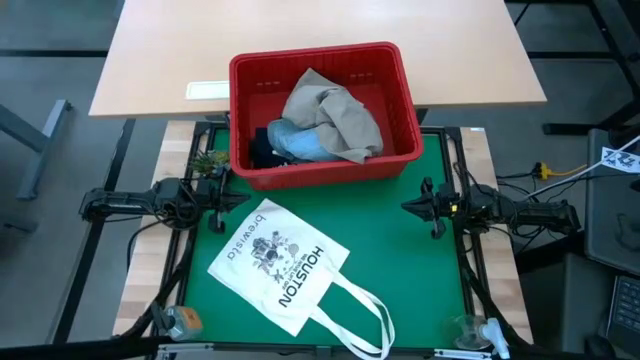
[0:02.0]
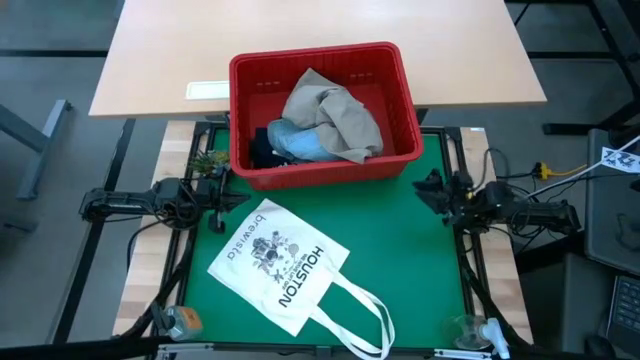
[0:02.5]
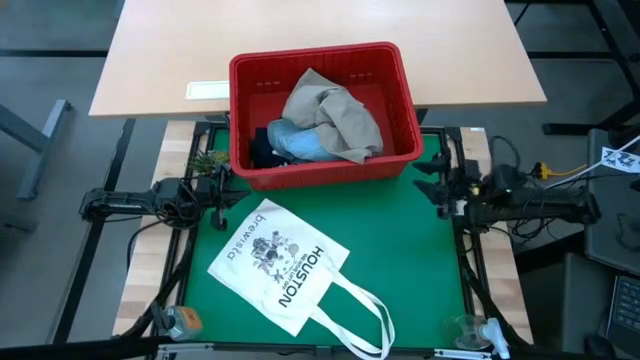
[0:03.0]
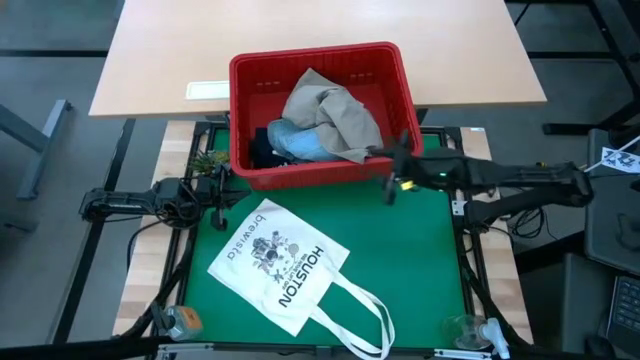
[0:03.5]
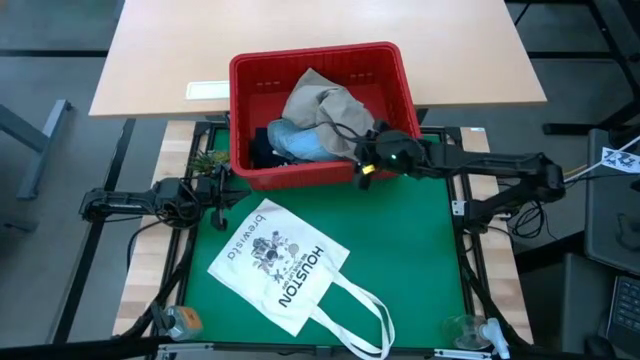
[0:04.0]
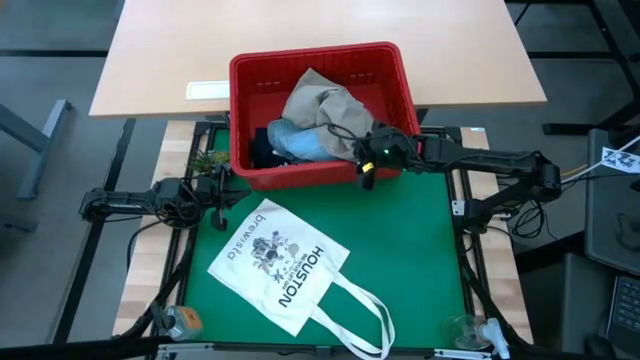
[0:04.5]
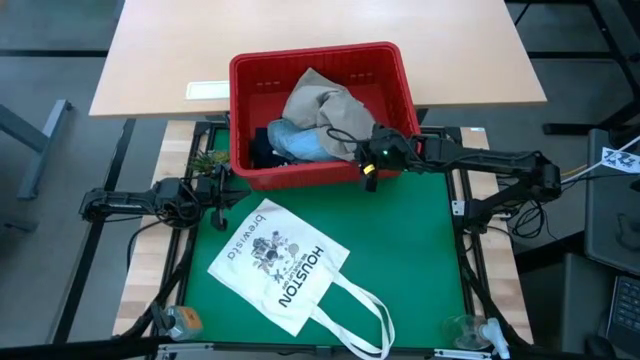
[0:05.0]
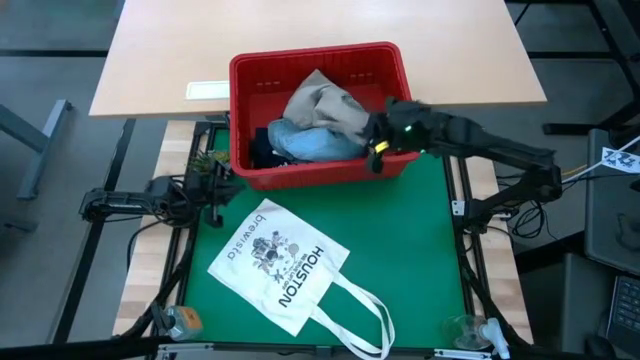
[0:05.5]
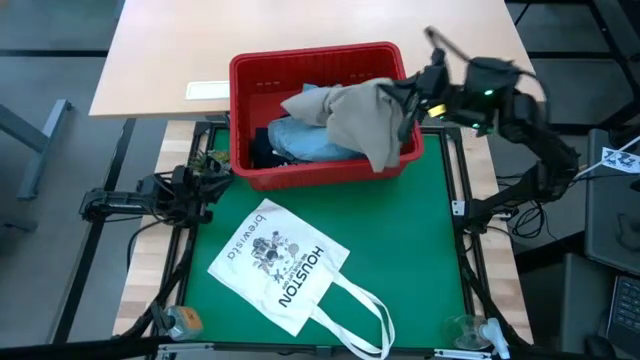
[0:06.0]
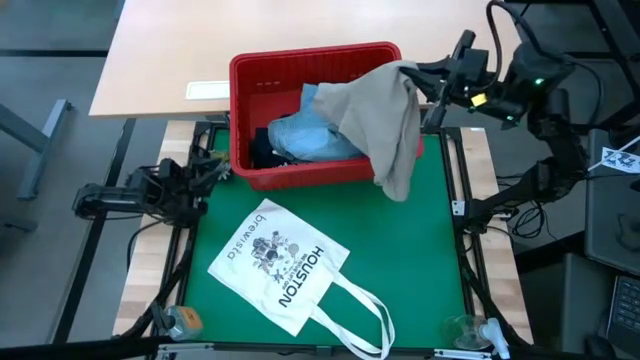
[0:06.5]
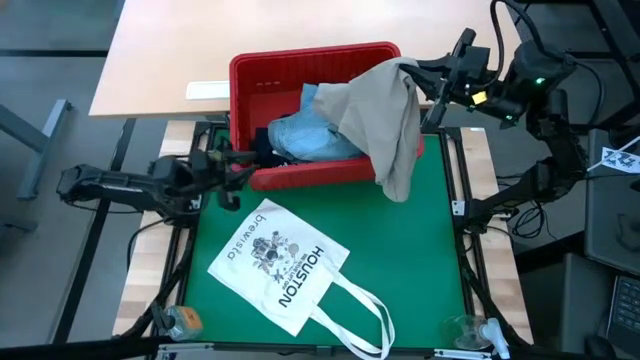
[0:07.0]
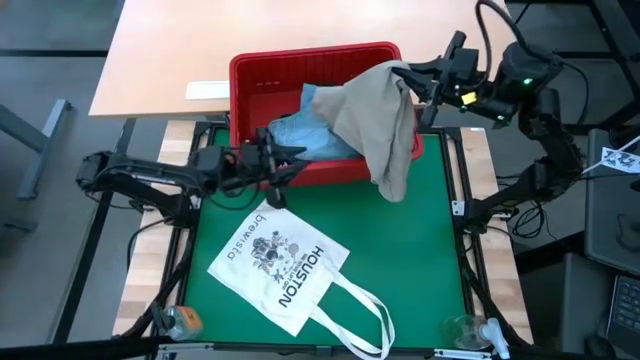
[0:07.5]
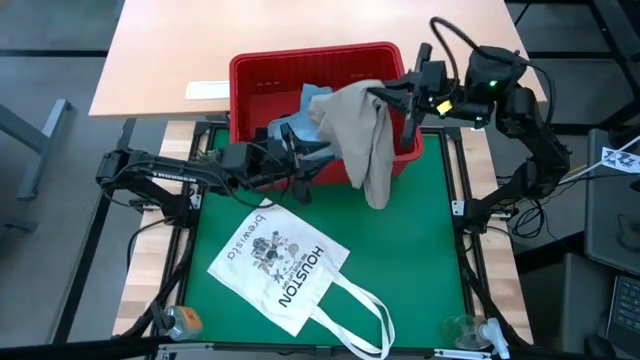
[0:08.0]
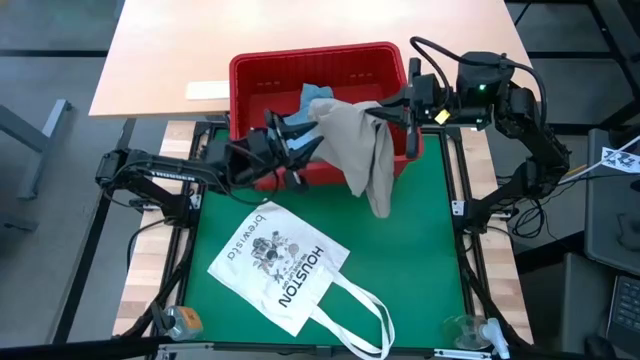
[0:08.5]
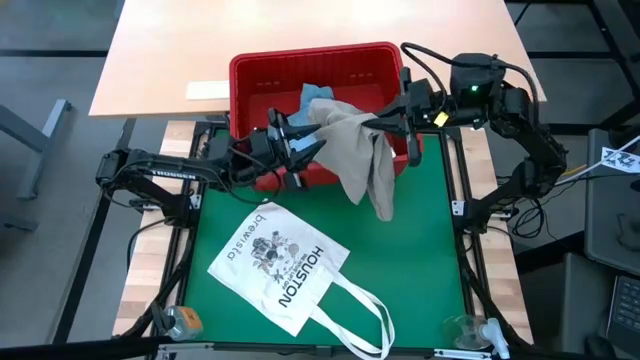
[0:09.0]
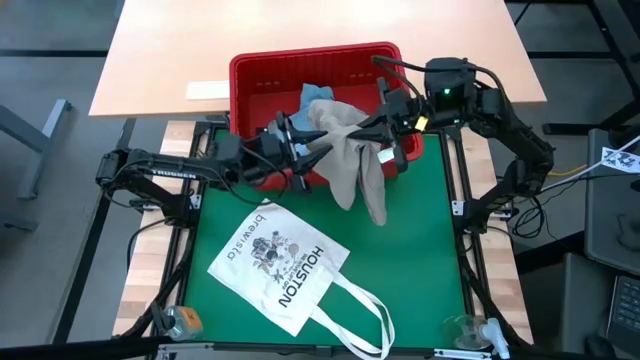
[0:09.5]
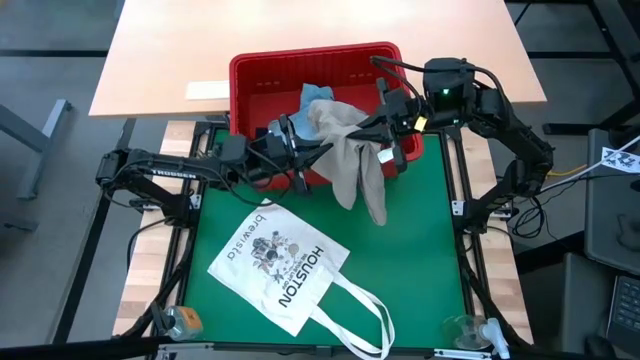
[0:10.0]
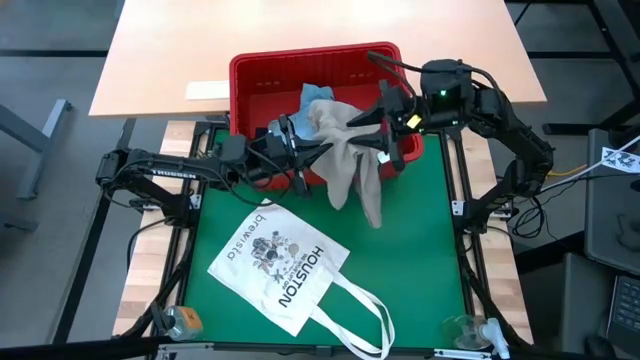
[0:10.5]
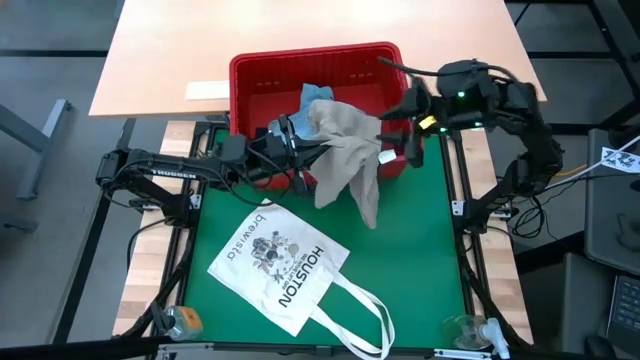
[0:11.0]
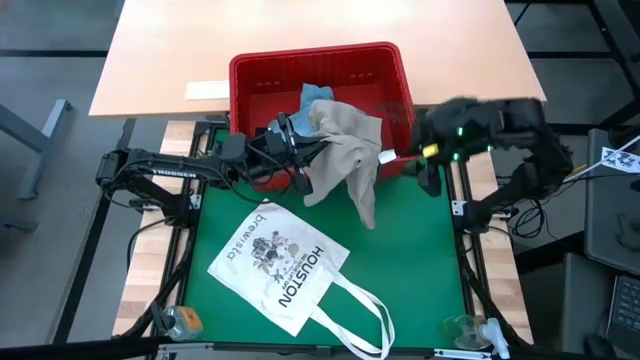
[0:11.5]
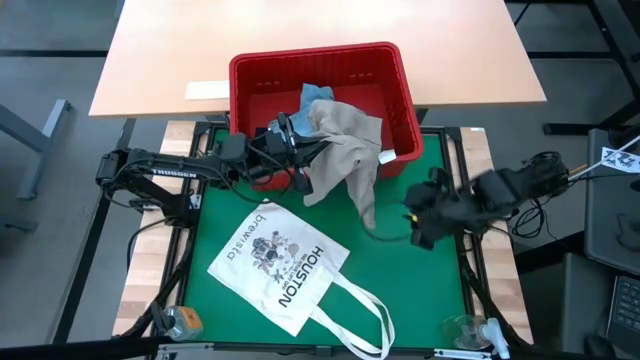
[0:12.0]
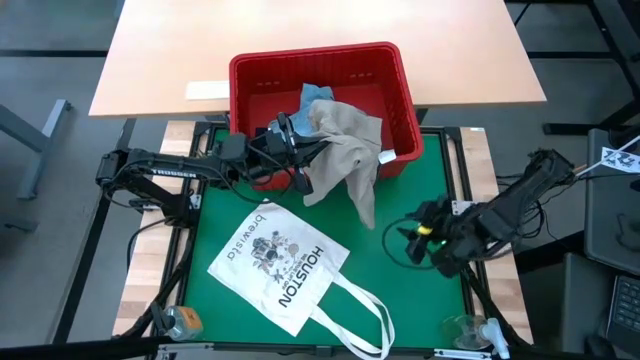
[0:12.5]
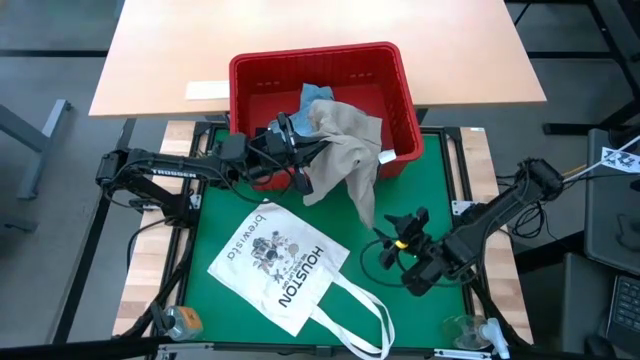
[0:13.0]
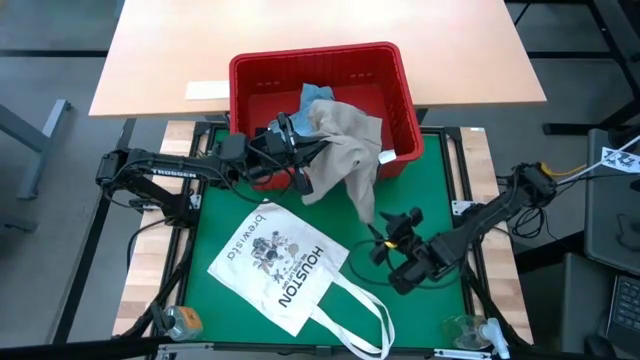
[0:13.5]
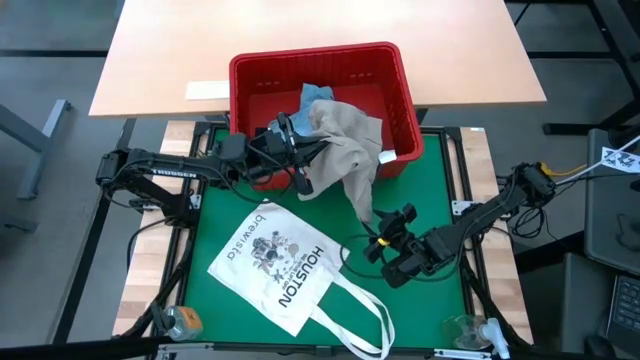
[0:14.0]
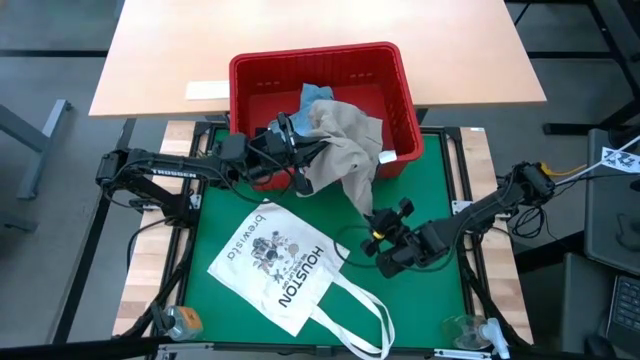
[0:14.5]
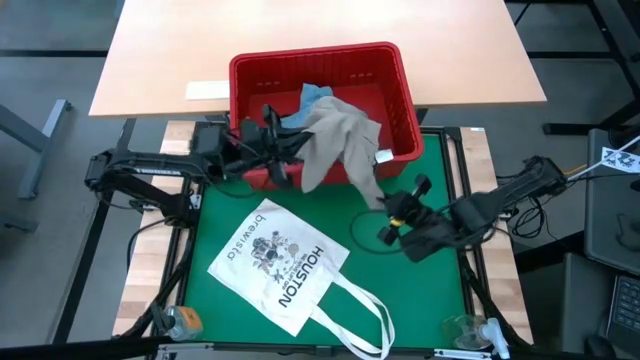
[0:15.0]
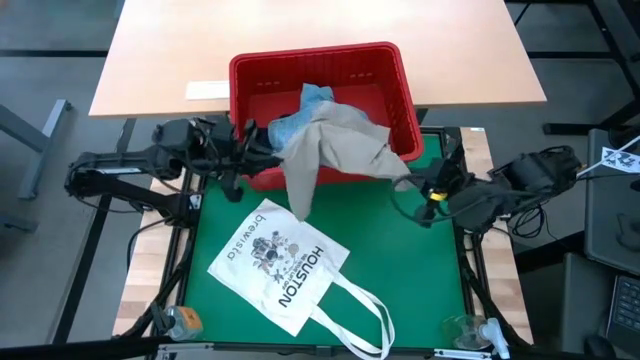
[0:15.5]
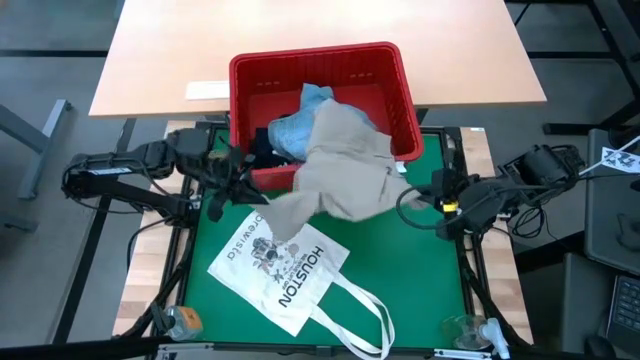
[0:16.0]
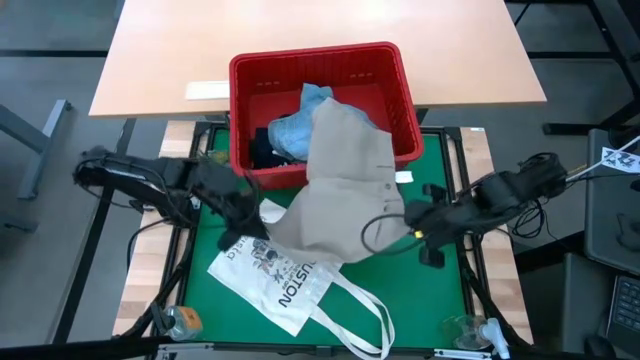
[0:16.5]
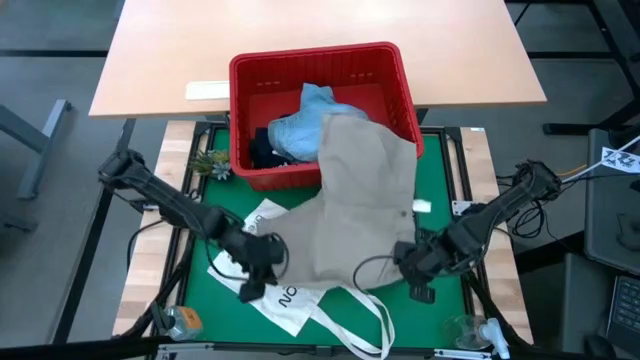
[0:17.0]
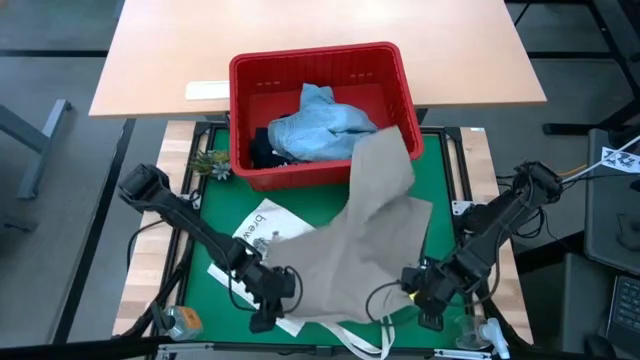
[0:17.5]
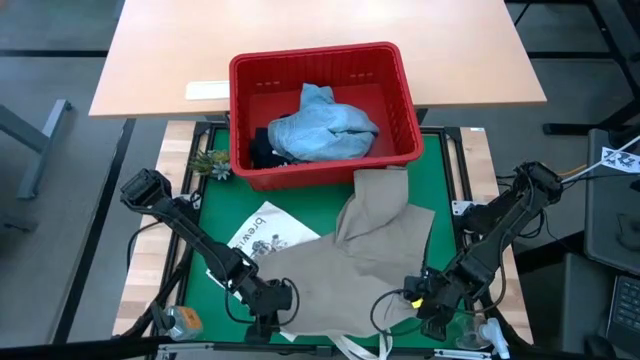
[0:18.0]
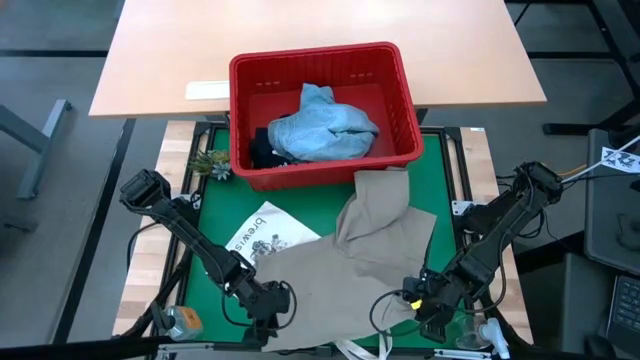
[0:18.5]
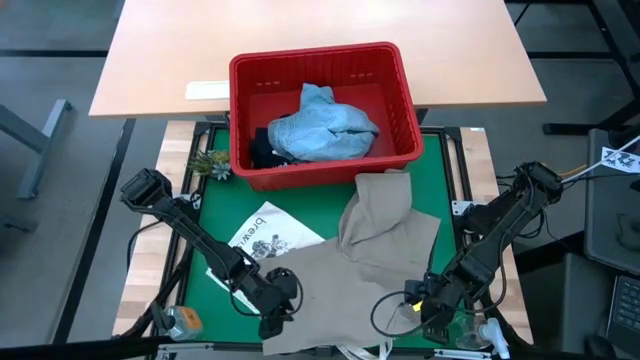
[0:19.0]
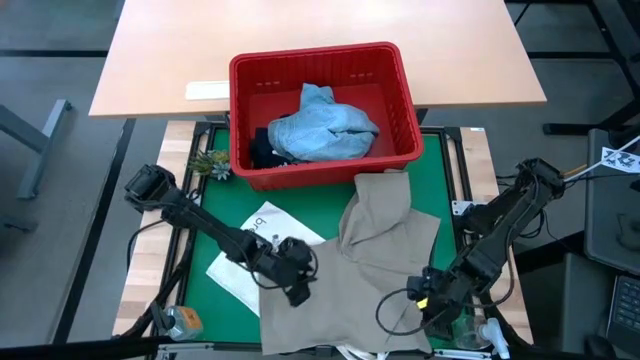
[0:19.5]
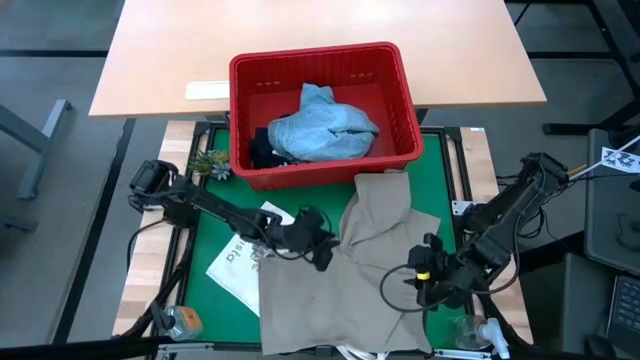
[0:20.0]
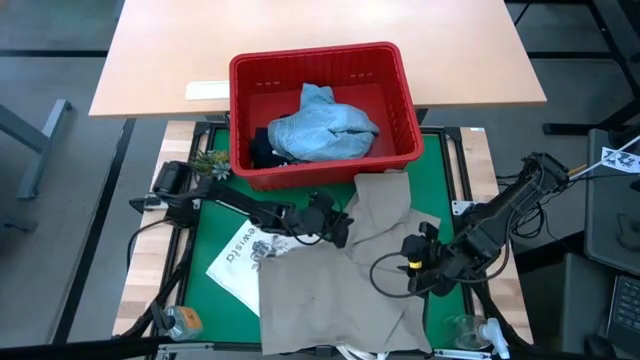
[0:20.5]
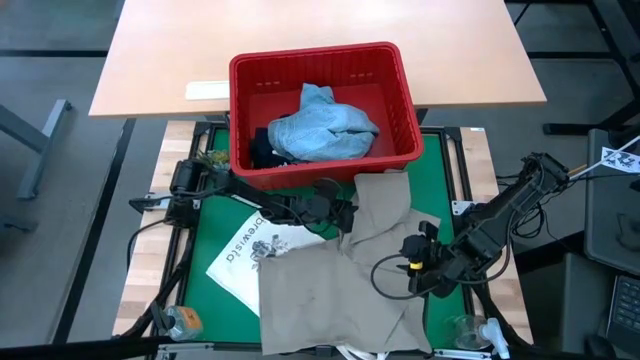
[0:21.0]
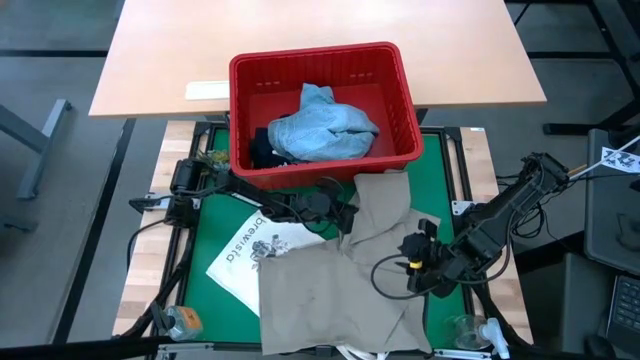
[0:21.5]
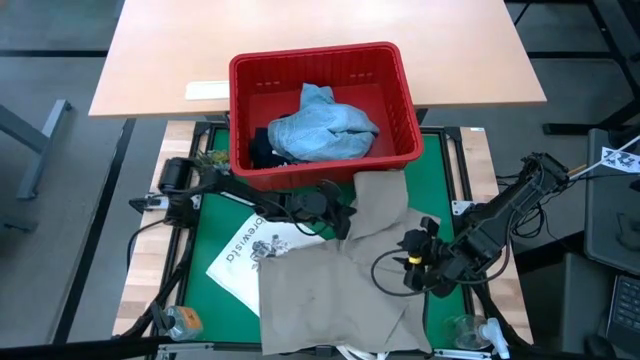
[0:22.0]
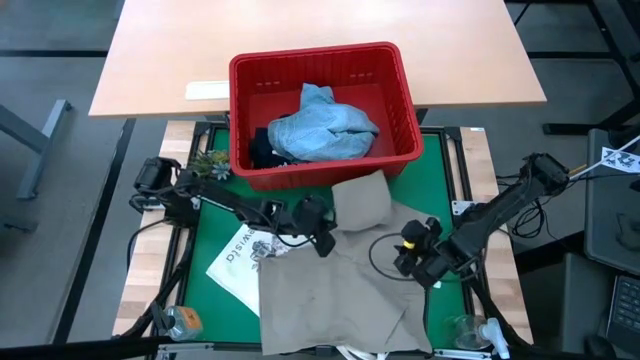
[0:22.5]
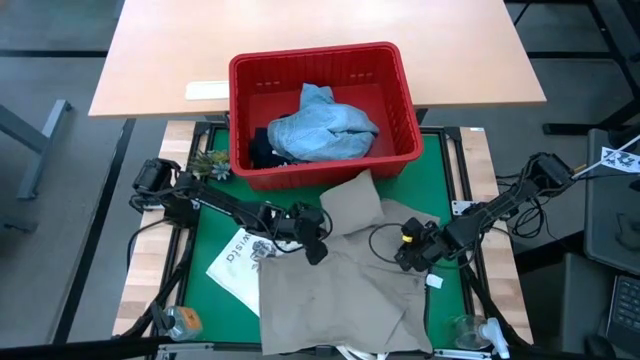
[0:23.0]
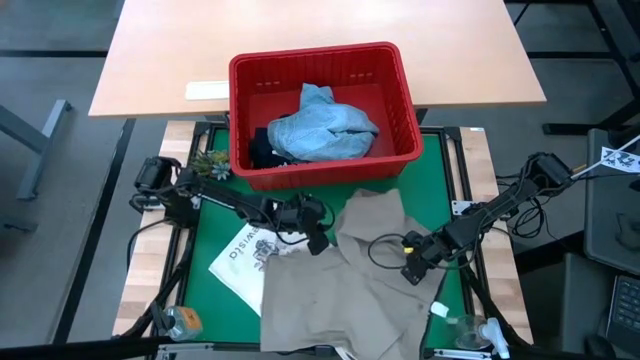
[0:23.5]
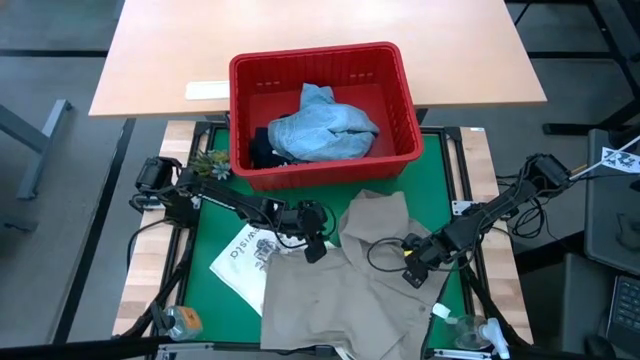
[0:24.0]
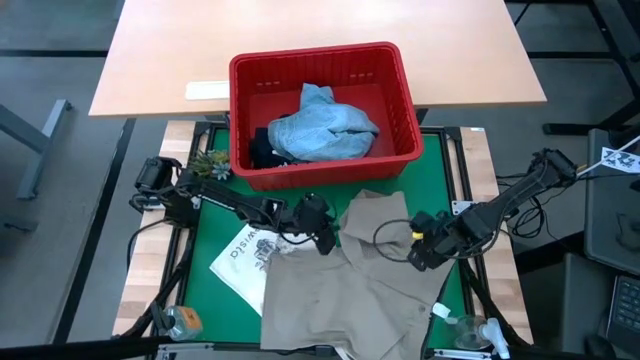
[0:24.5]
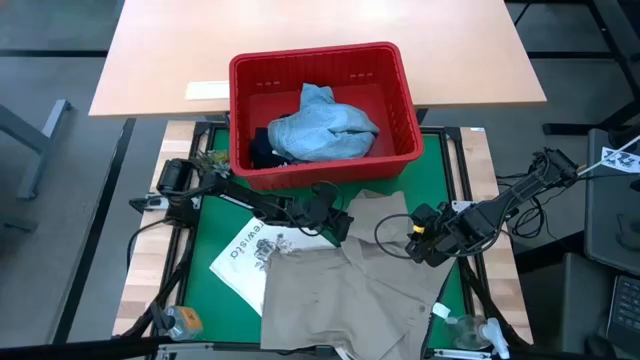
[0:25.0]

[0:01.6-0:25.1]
Task: Fold Laundry from Bin
Fold the beige shorts
